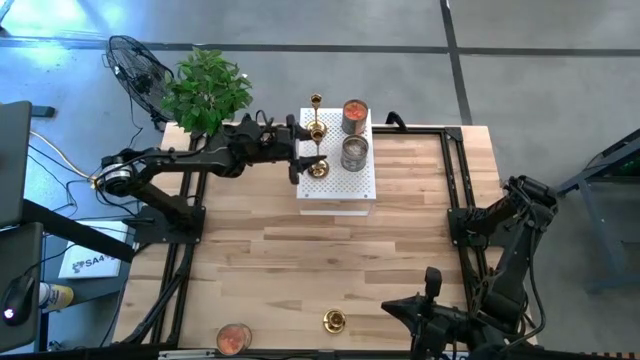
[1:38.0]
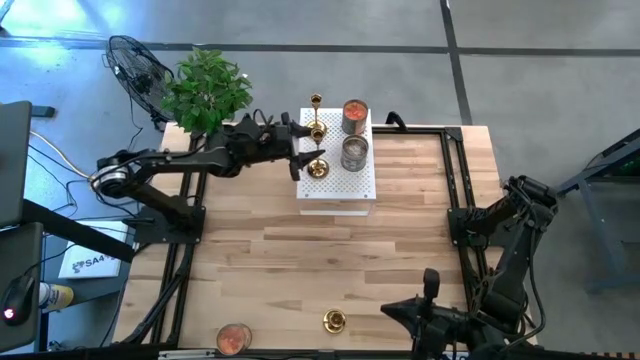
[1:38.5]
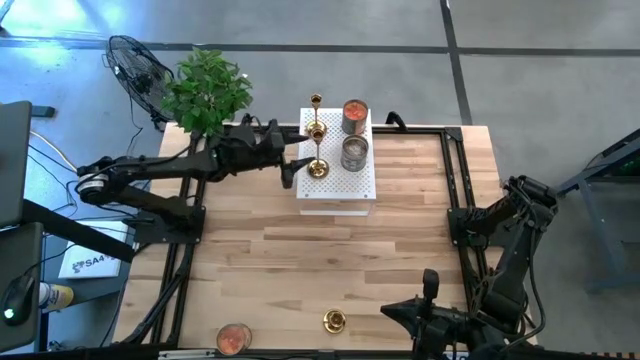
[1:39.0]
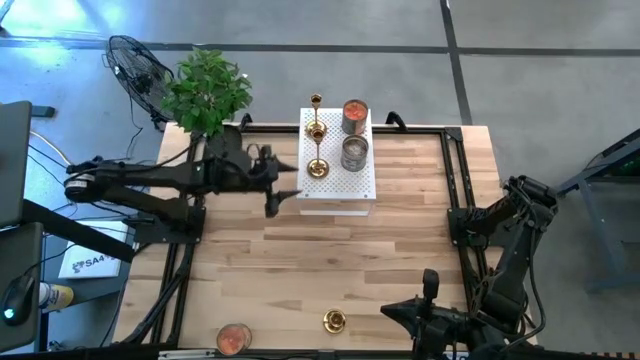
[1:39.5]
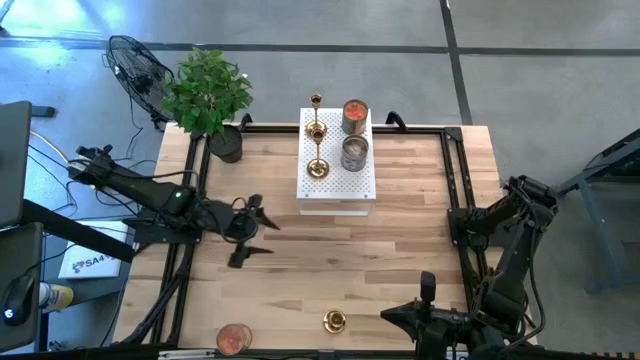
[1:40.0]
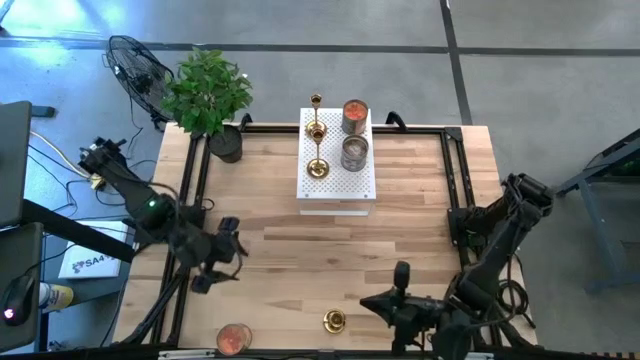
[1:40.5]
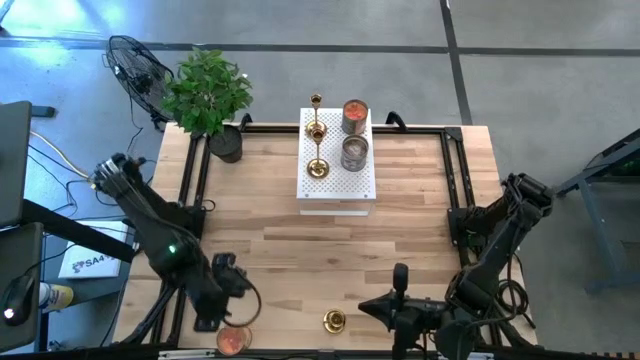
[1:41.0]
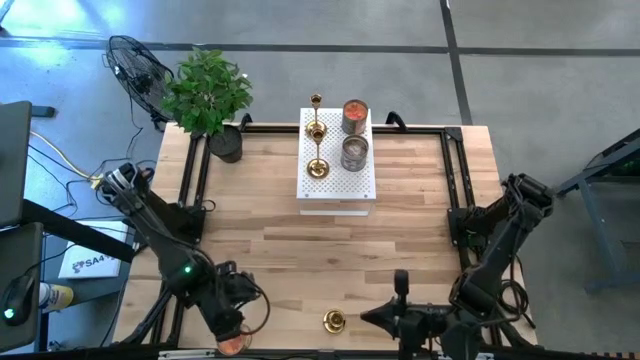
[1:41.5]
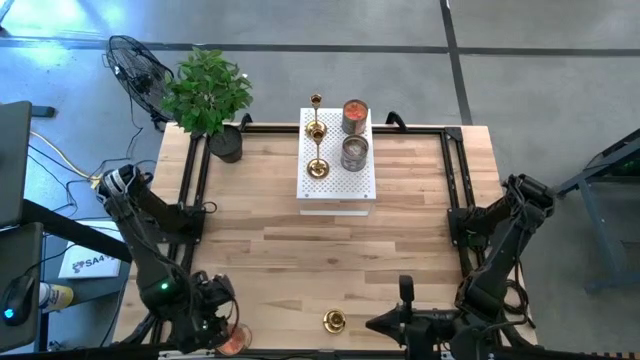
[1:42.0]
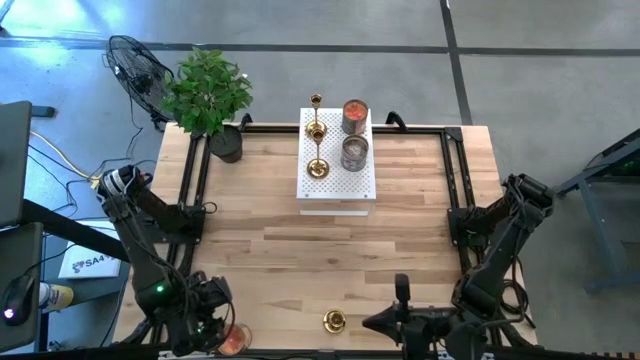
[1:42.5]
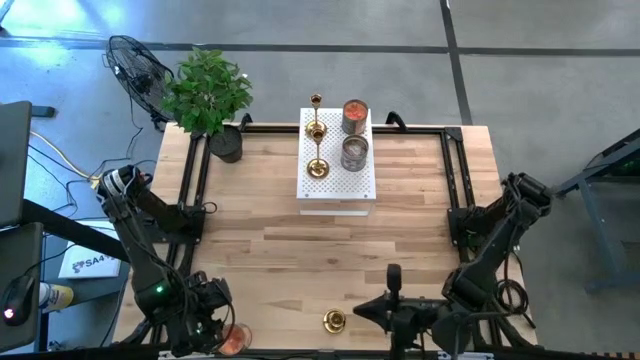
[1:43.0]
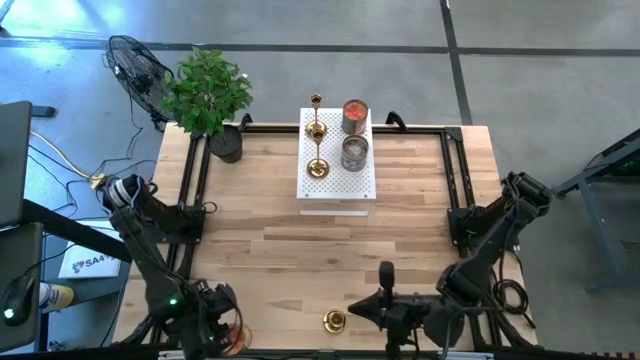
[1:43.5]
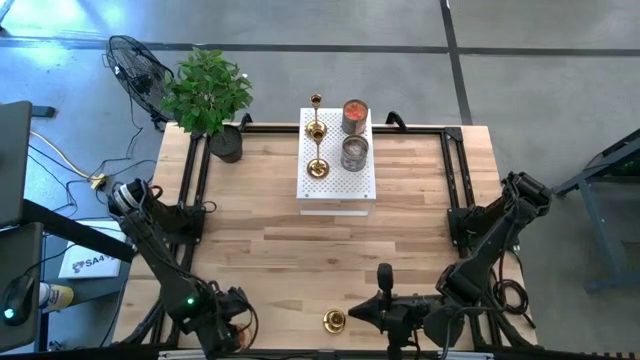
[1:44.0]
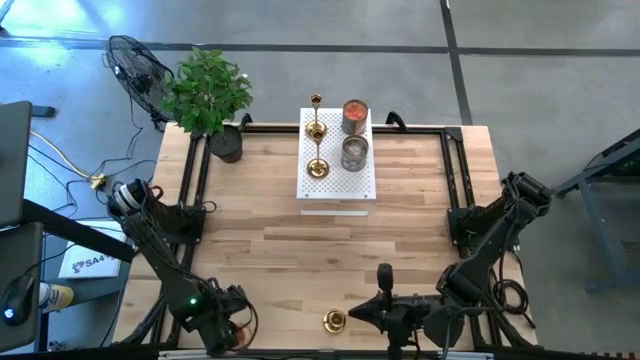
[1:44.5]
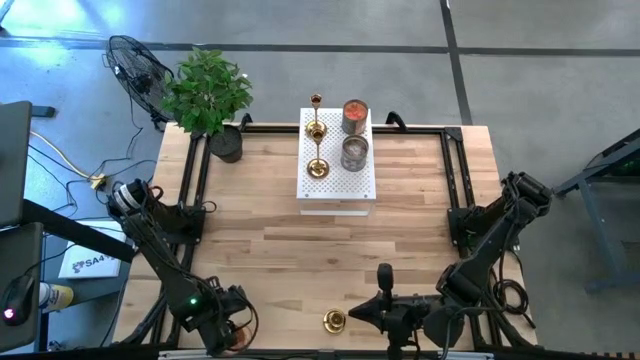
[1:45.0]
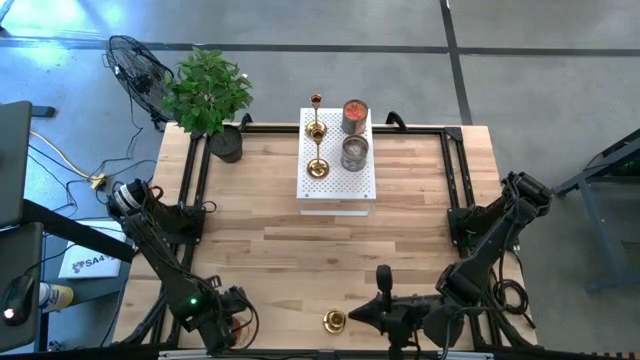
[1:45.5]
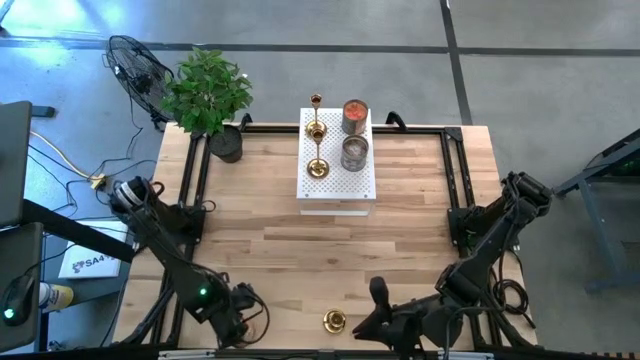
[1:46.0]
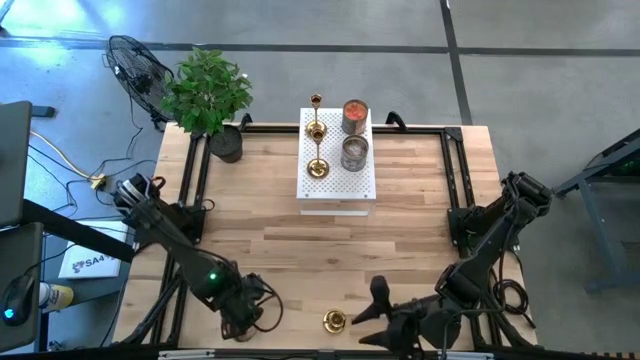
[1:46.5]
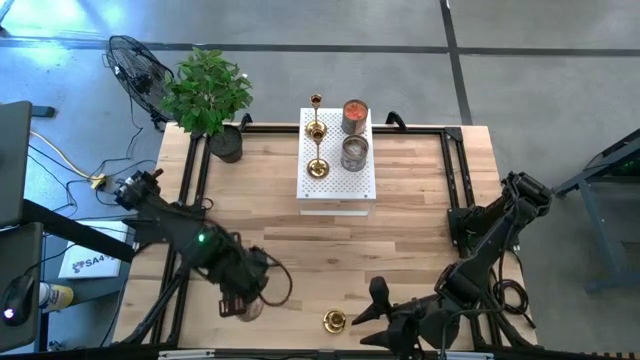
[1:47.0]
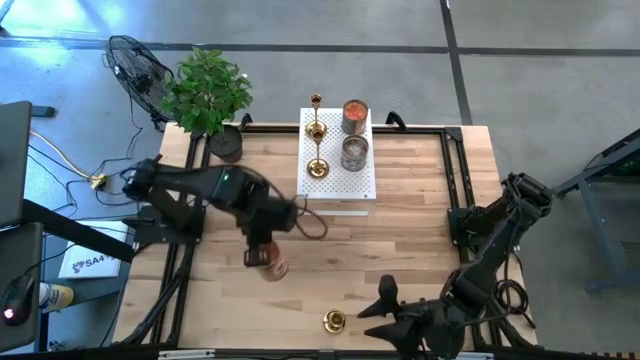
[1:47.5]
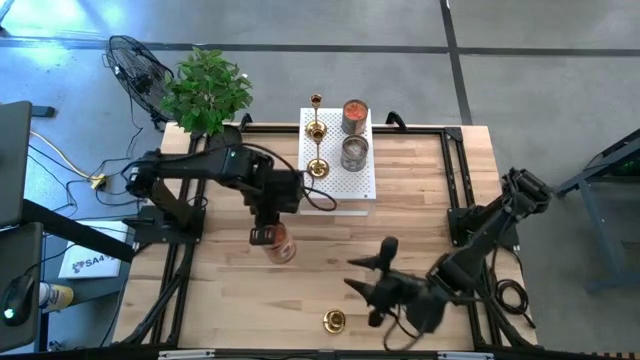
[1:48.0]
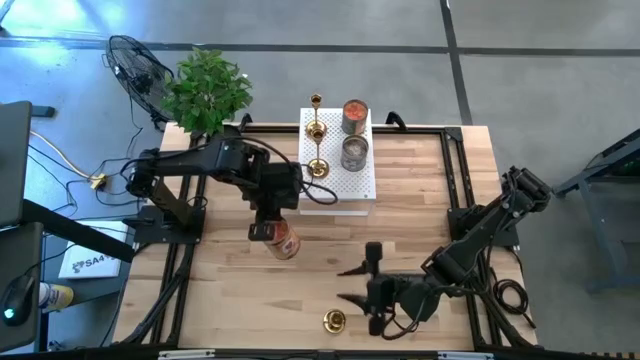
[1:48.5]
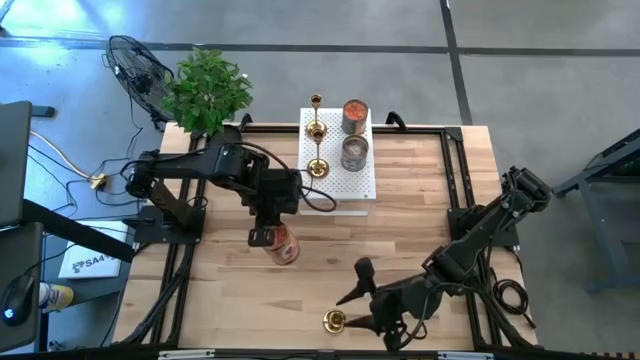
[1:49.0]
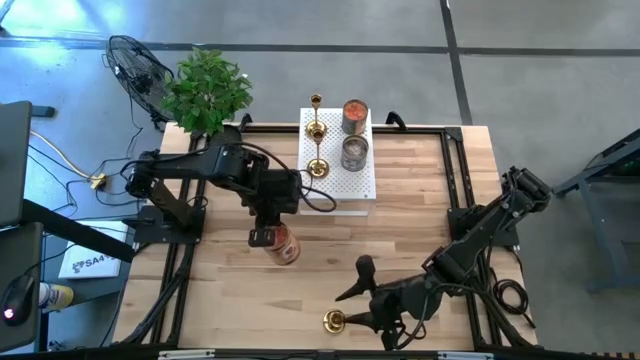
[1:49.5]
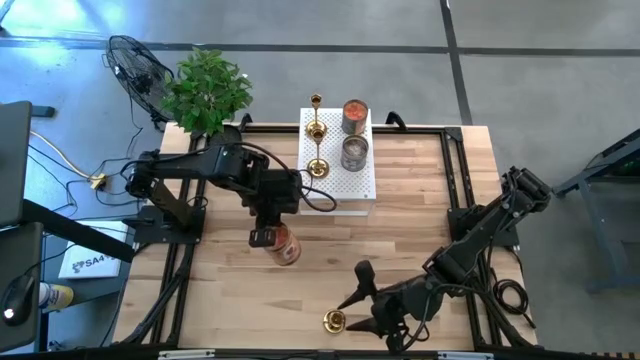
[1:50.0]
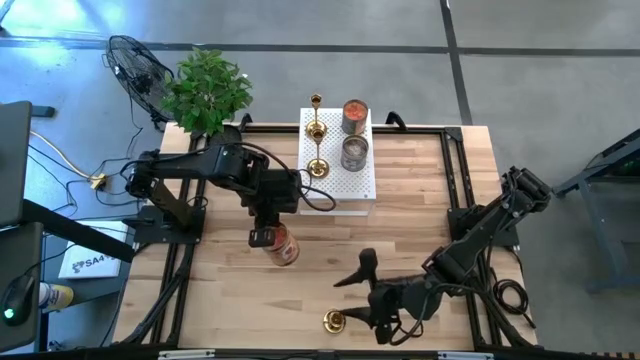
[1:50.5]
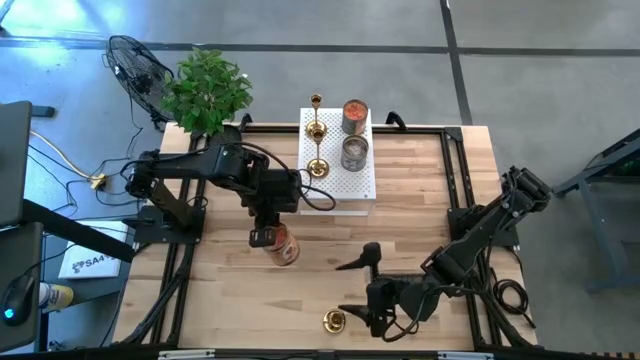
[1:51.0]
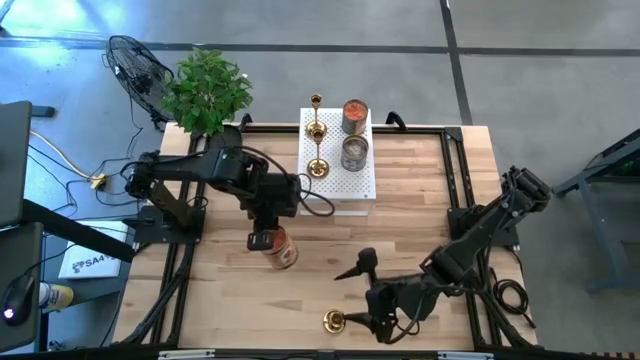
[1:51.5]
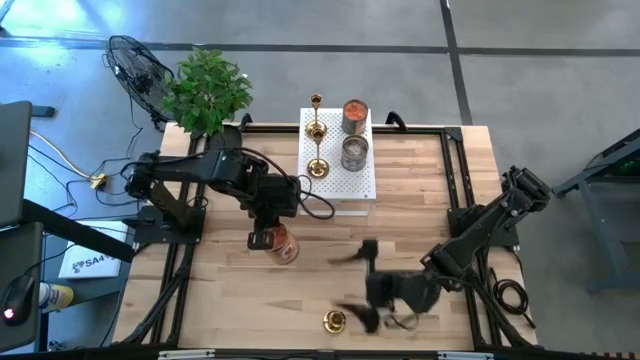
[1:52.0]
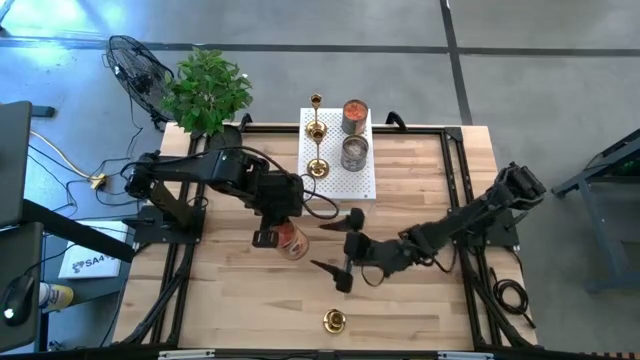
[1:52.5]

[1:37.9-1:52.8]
Task: Pick & Place candle stick holders
Put the orange scented candle on the shelf

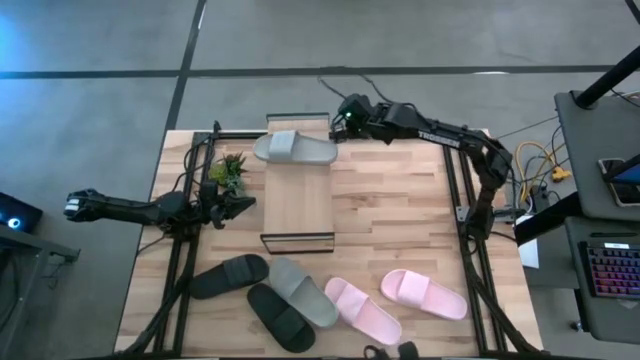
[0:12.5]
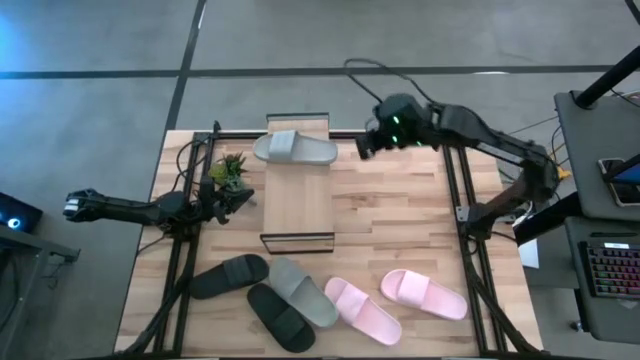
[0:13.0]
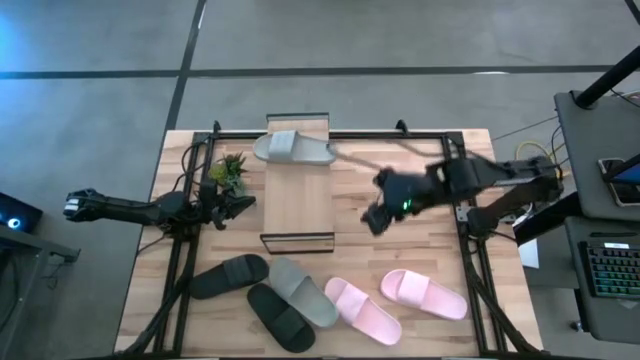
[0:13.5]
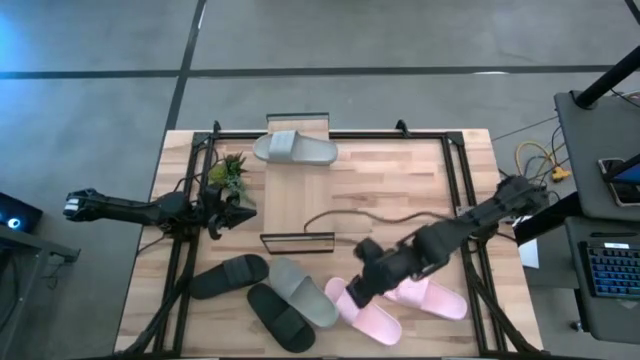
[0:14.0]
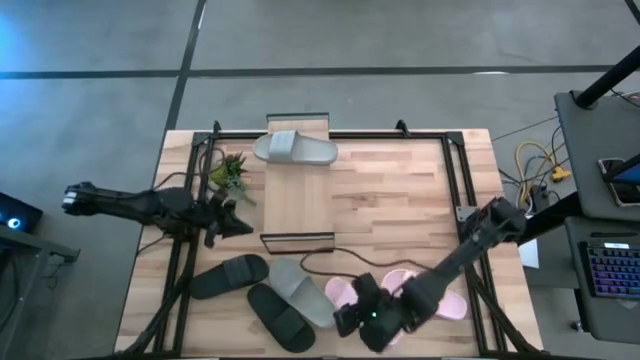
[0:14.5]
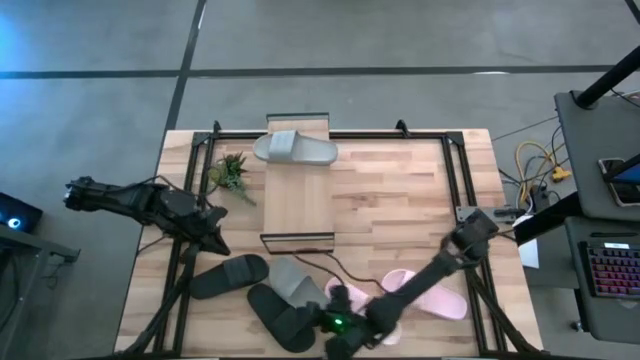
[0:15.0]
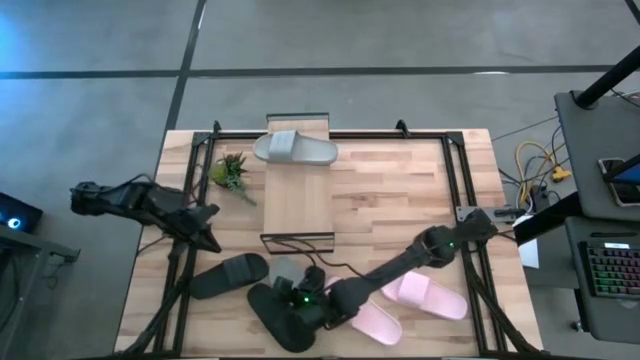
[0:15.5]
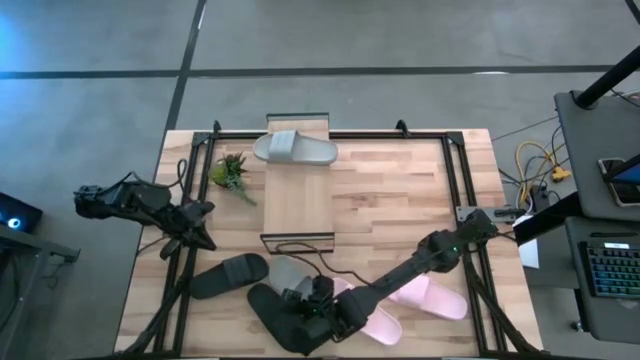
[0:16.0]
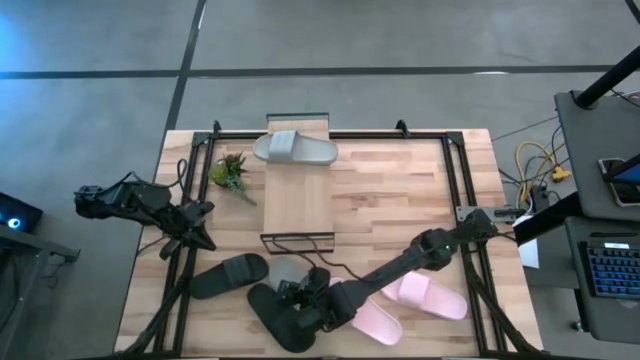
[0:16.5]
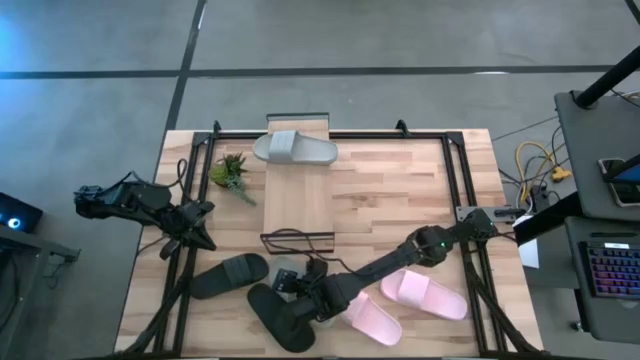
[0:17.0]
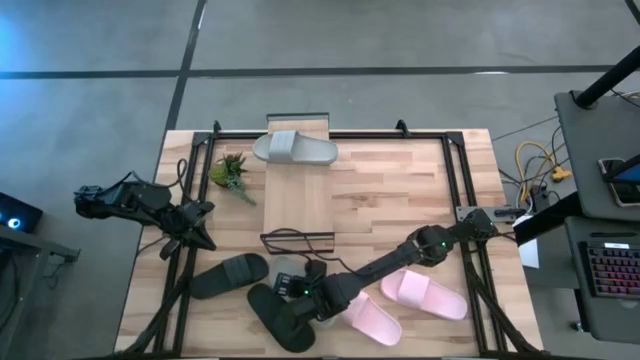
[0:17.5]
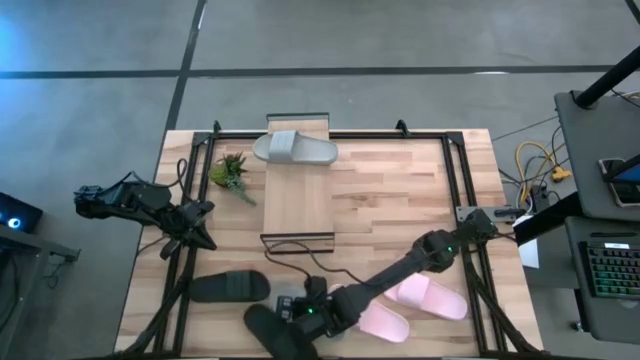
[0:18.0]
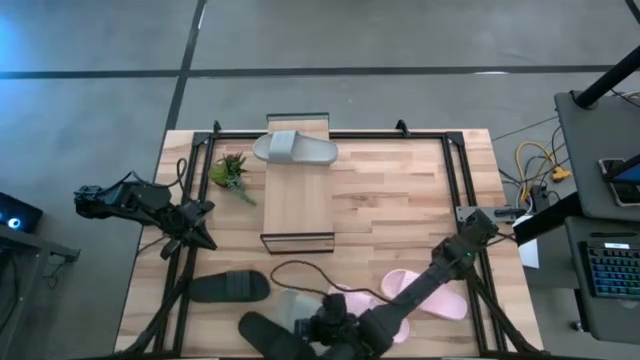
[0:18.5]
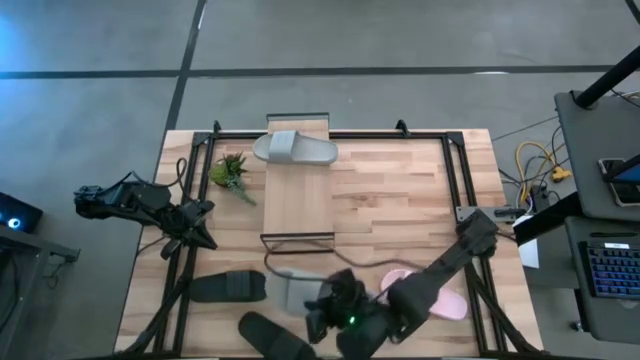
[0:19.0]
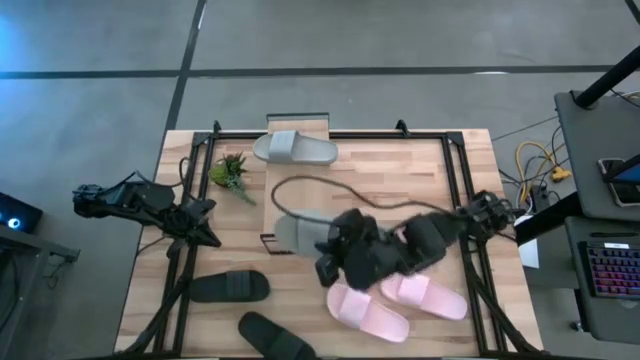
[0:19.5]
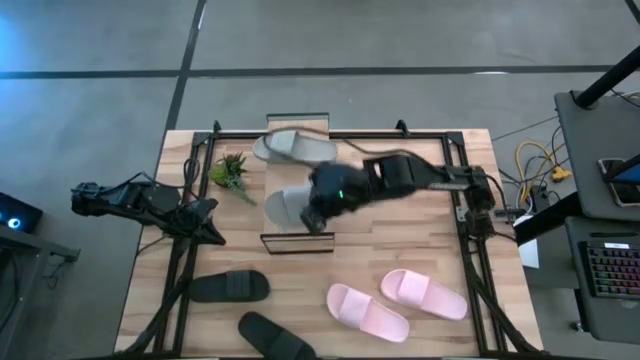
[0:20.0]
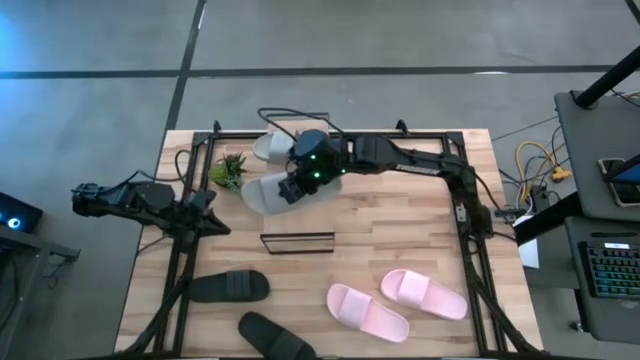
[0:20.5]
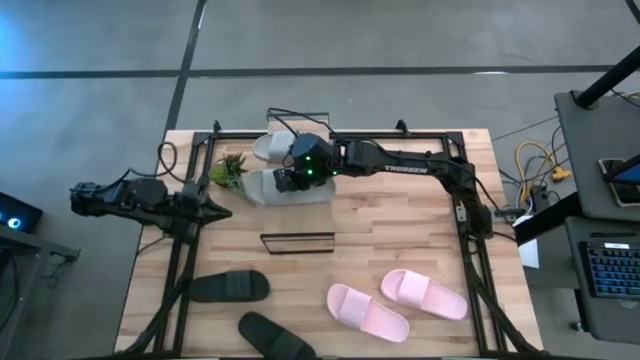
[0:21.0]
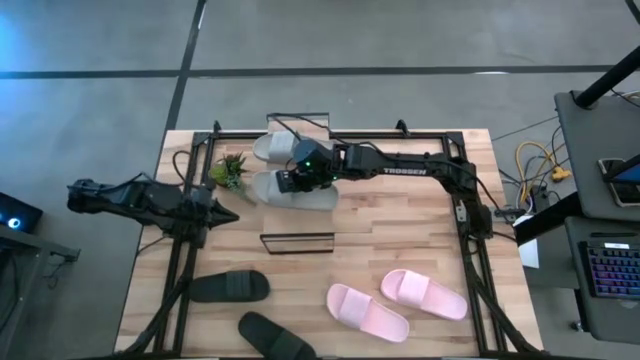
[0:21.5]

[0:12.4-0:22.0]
Task: Pick and place slides into the shelf
Put the gray slide on the shelf
